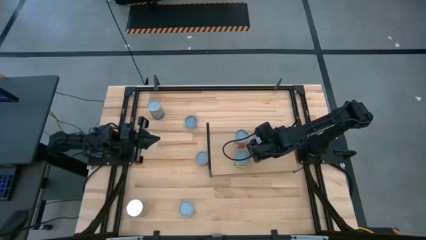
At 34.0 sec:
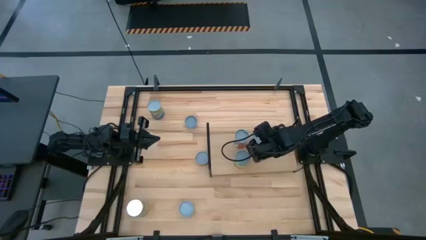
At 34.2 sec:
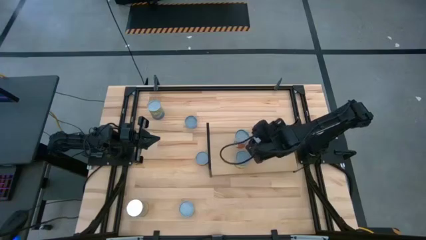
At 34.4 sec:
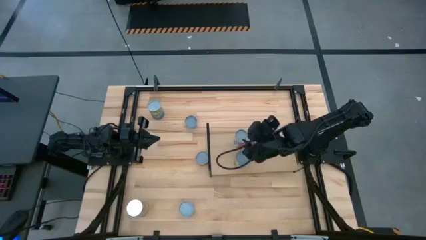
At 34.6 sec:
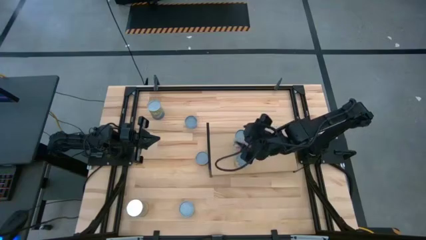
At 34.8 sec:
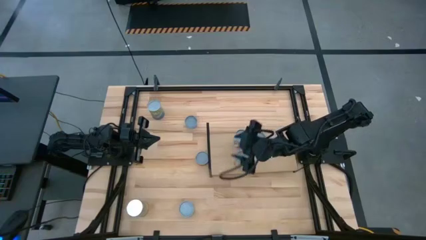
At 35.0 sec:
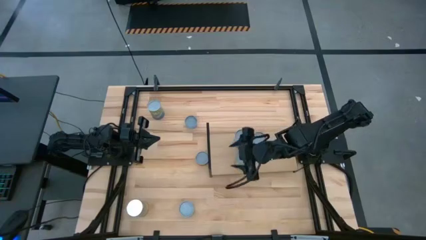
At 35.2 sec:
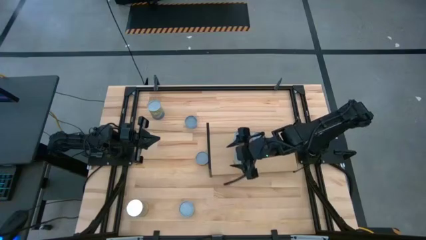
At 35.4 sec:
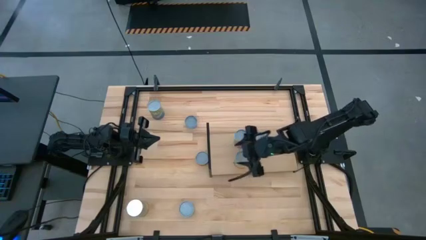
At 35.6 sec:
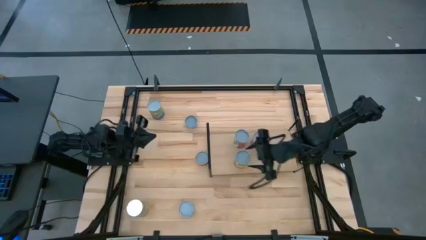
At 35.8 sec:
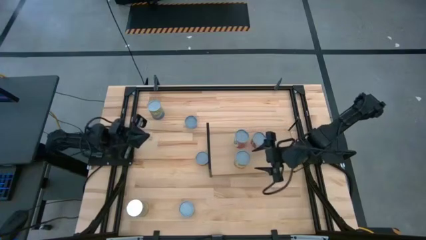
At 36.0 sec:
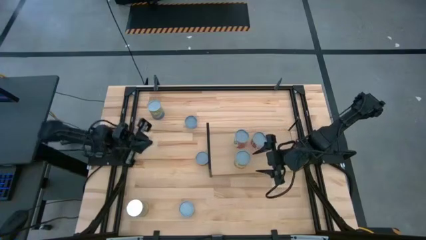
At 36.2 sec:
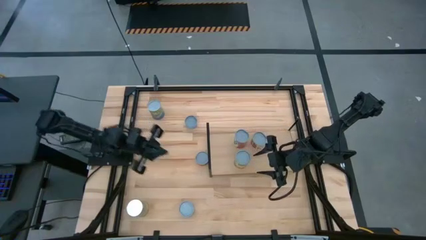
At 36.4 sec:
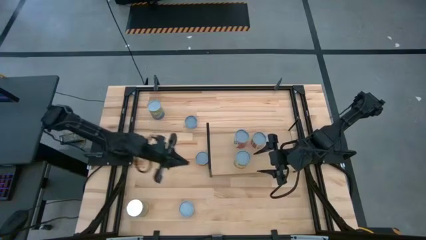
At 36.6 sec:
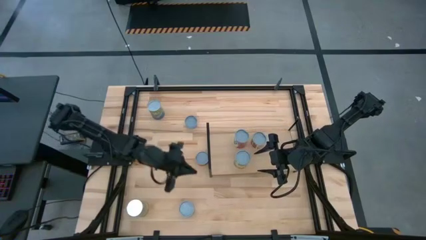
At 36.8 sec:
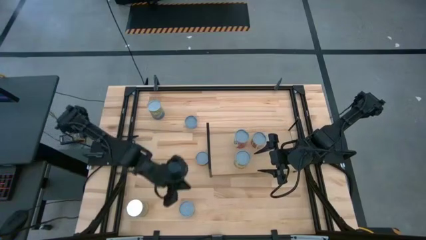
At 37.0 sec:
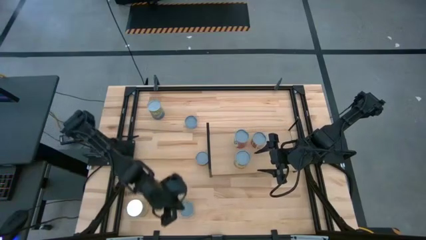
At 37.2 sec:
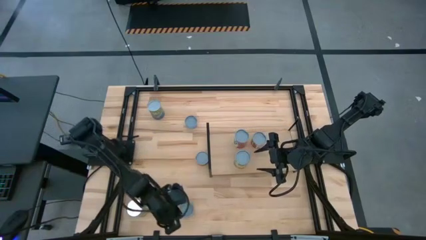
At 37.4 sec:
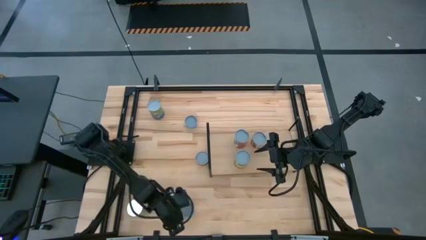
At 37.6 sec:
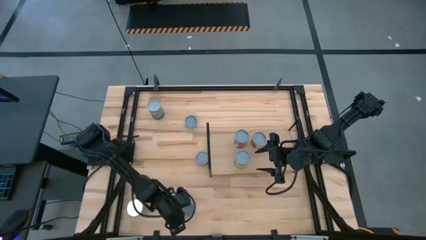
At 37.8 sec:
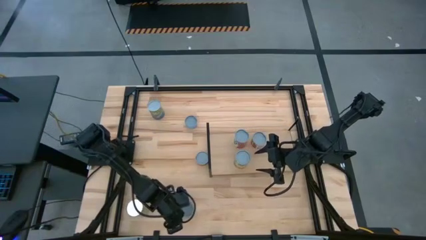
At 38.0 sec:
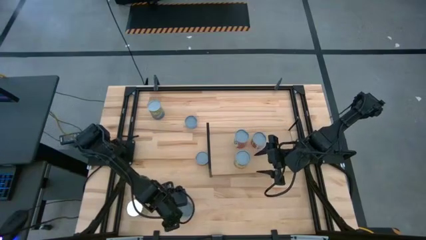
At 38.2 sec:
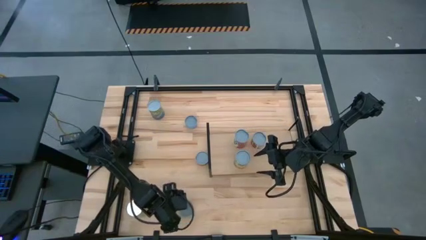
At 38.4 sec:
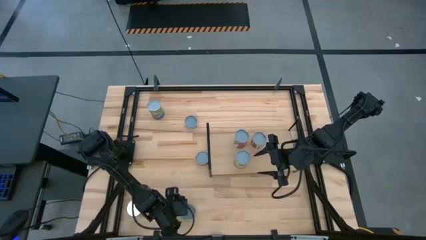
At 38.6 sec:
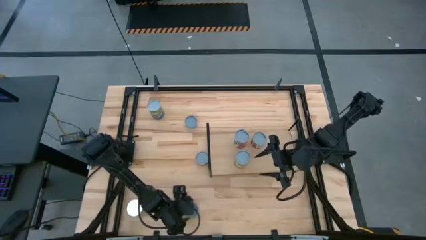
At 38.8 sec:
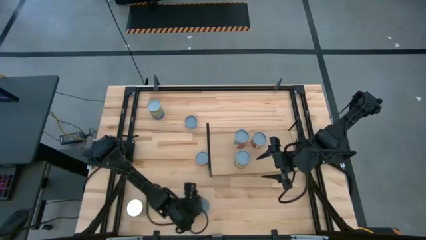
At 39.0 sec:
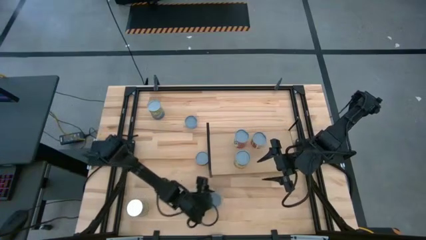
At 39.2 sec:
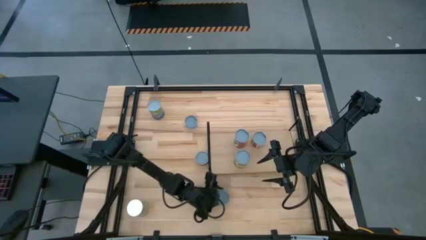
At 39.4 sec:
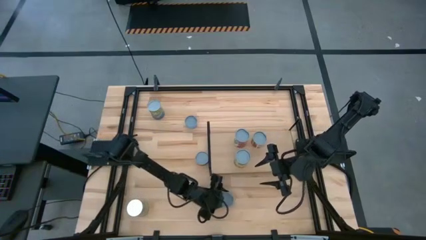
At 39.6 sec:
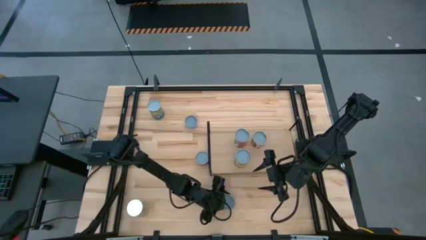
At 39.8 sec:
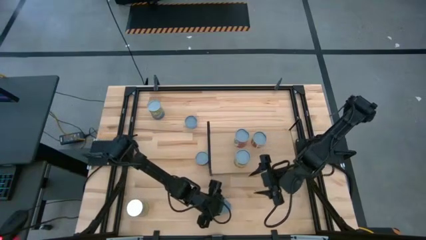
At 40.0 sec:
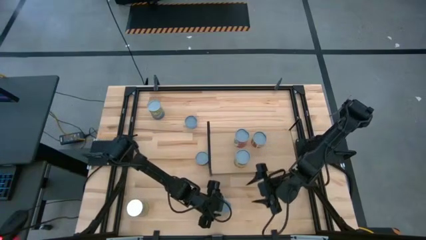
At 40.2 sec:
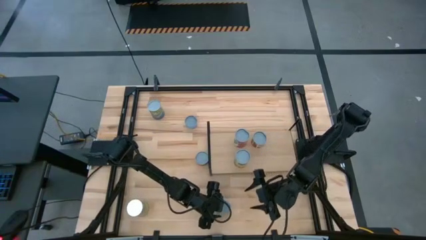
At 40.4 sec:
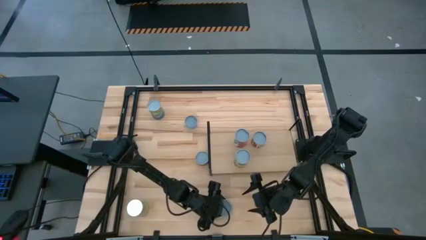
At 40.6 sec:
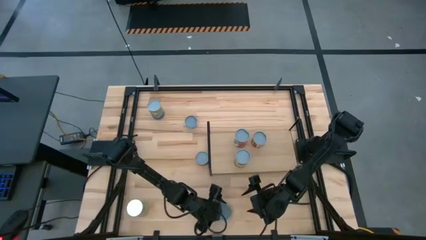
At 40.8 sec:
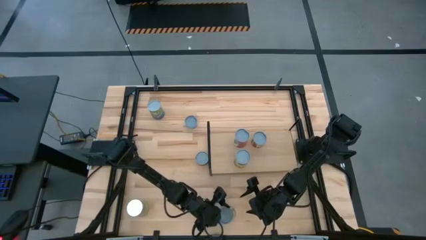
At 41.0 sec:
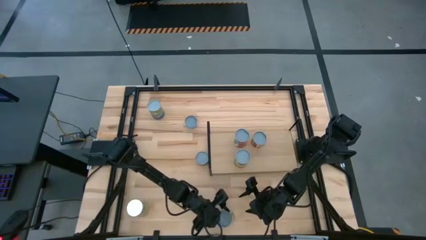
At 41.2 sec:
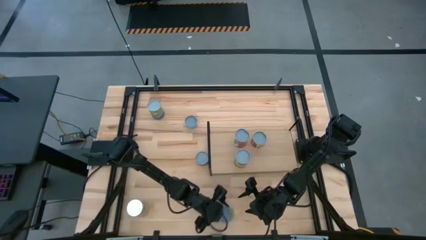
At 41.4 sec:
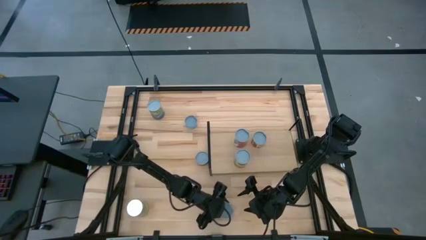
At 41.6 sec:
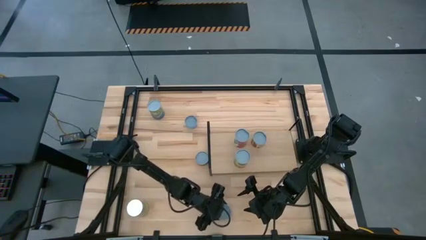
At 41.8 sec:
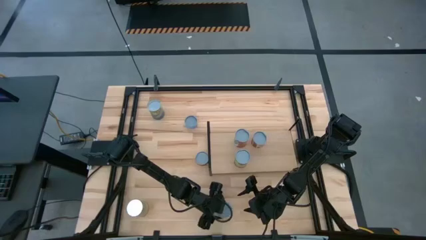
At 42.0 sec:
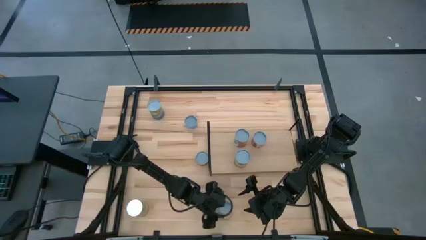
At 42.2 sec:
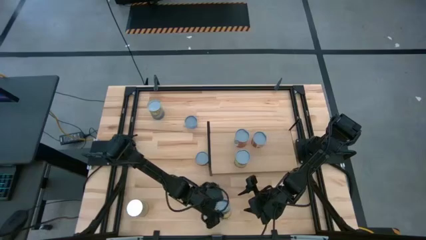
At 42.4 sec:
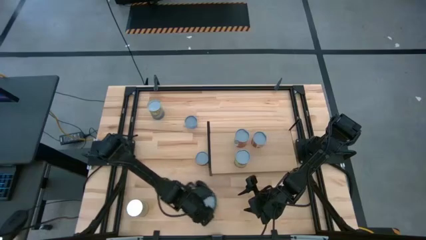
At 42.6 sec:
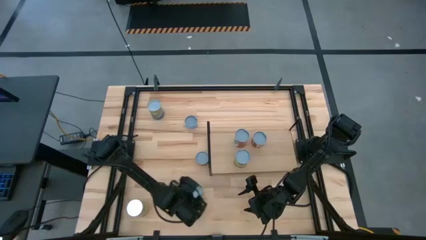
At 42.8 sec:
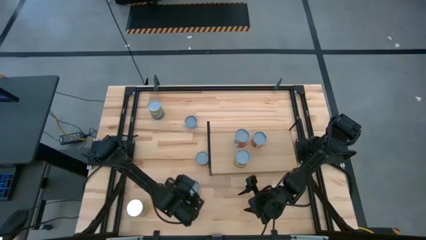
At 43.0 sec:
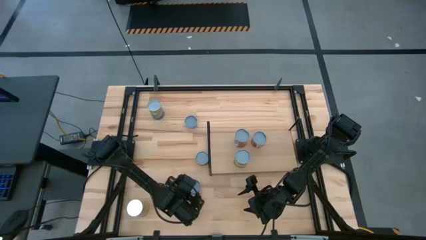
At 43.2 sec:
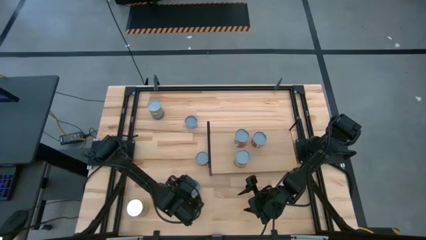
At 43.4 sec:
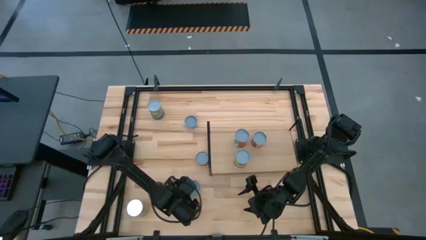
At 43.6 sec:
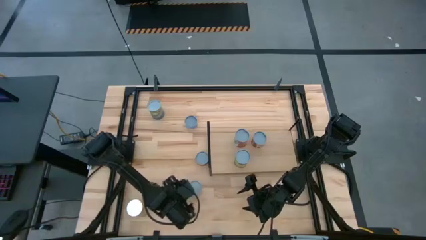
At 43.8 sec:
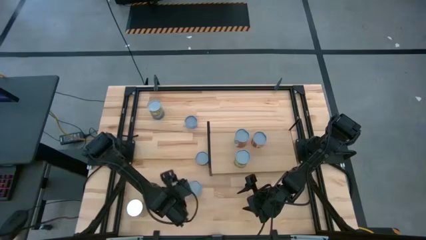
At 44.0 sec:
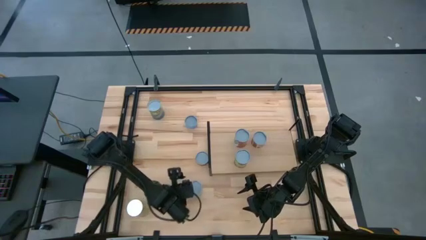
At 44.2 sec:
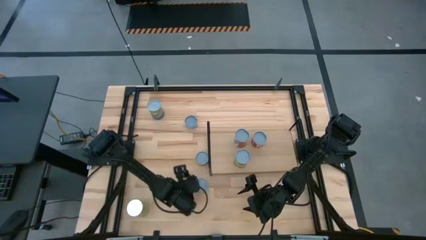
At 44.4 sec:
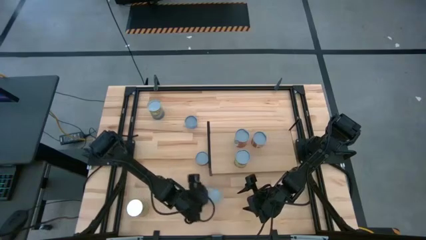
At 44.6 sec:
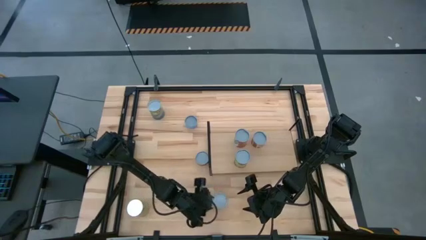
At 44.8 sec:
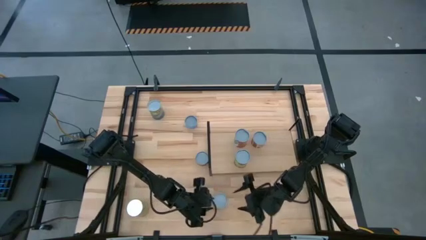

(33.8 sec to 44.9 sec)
Task: Pick and place cans onto a shelf
Move the orange can to the center of the table

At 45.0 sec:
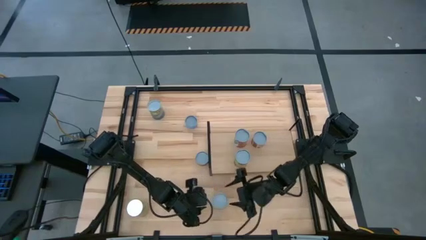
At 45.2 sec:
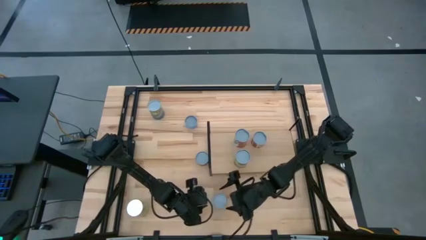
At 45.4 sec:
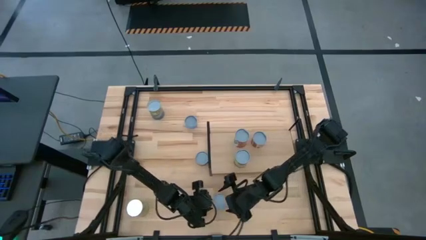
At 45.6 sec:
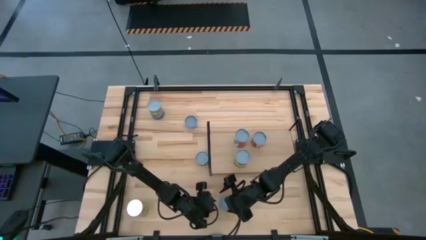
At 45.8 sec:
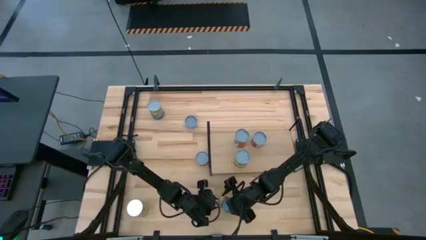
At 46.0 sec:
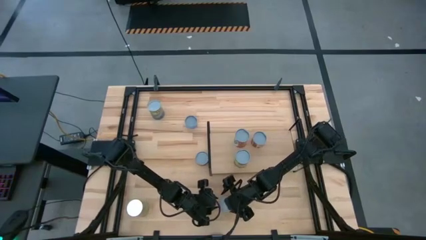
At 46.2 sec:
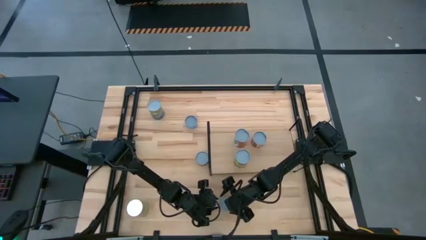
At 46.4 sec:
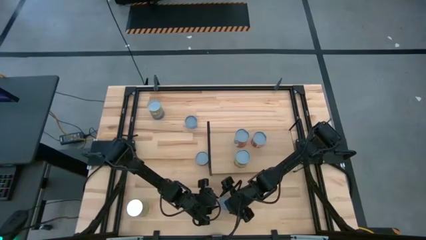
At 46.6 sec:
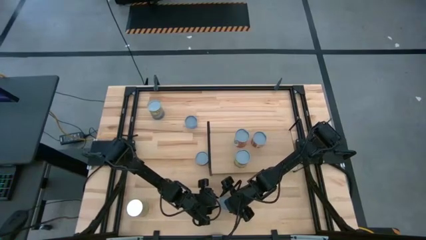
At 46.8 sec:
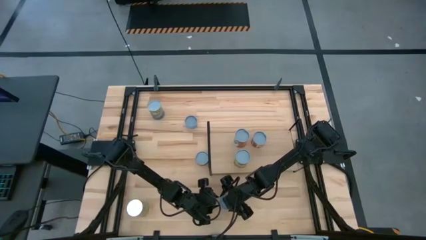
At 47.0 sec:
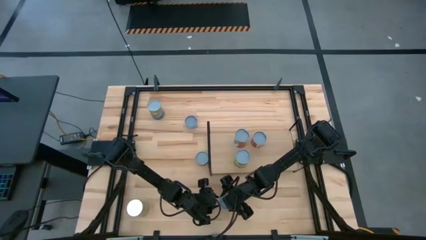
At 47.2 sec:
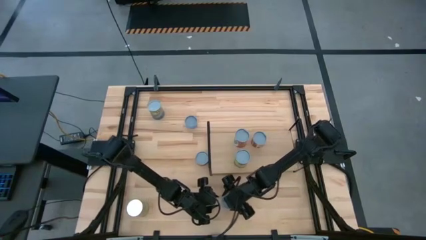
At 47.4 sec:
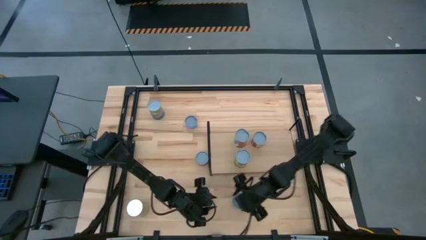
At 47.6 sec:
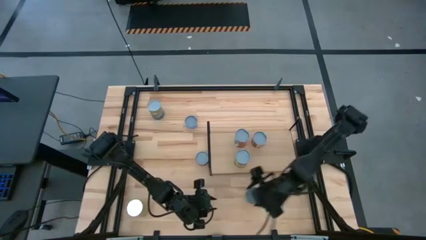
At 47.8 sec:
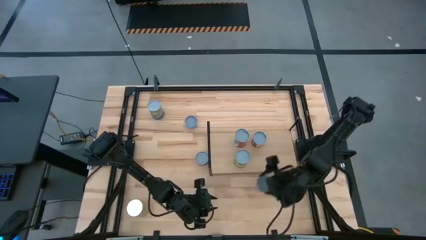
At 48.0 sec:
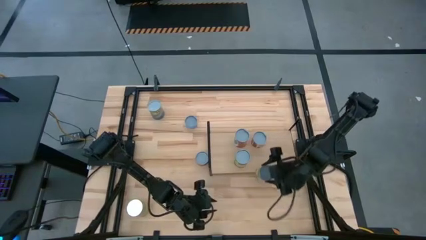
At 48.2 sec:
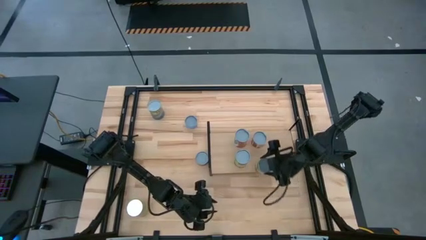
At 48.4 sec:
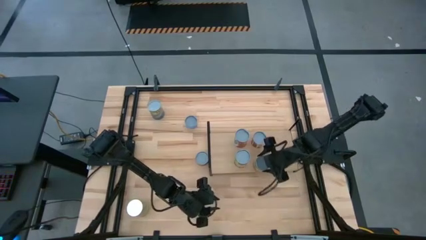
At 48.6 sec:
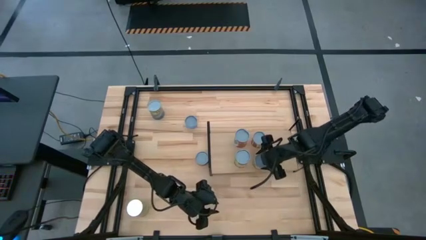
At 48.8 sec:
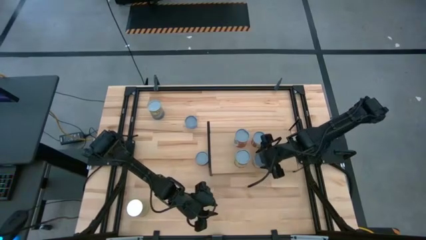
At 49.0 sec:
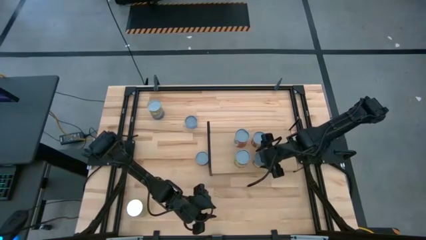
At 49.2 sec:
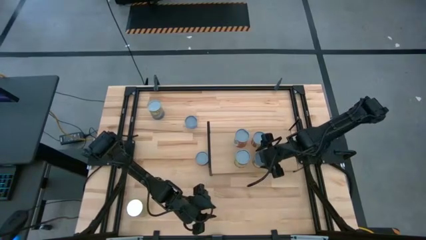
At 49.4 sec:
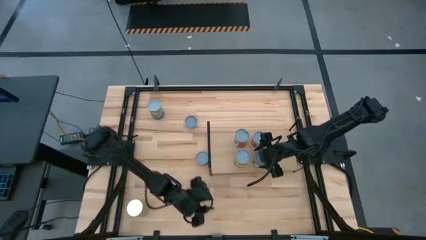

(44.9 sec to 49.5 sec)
Put the orange can on the shelf aligned with the red can
